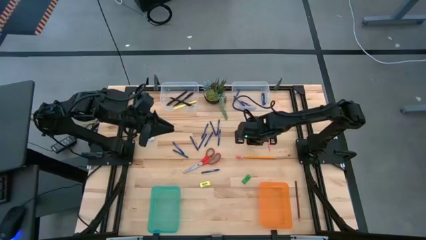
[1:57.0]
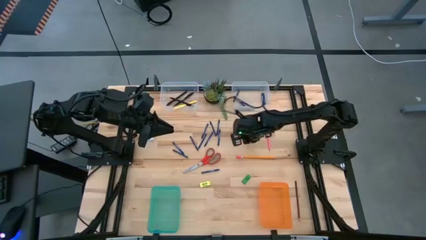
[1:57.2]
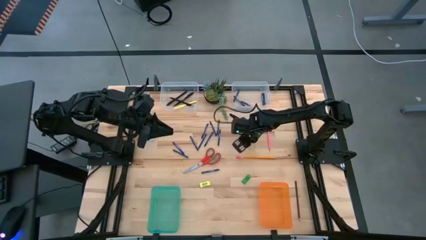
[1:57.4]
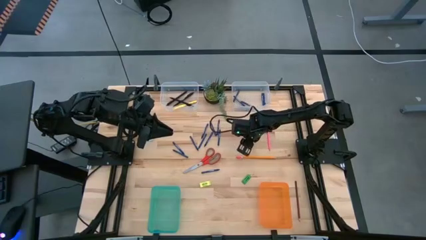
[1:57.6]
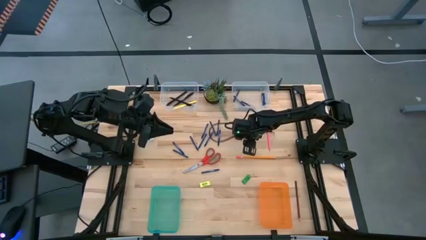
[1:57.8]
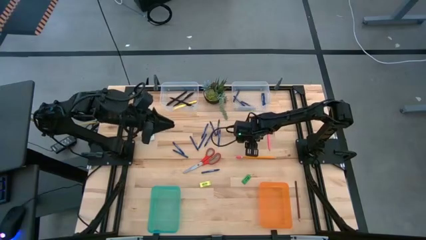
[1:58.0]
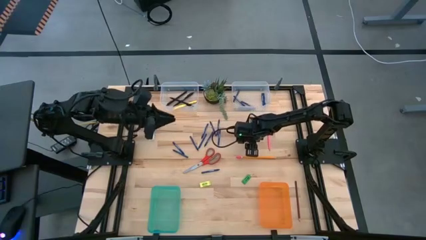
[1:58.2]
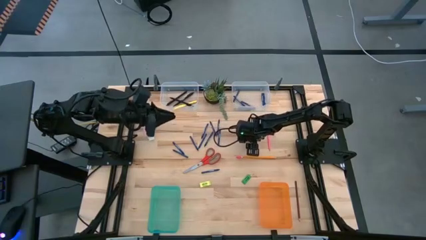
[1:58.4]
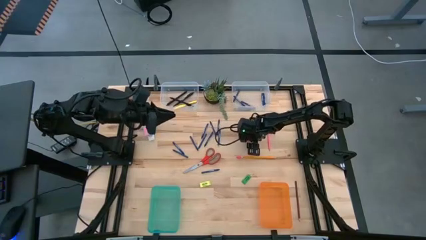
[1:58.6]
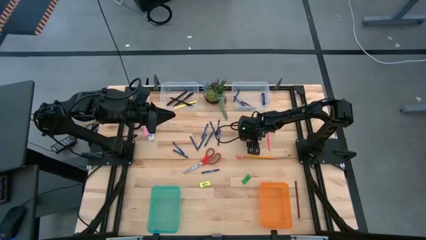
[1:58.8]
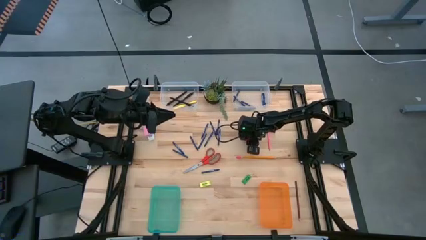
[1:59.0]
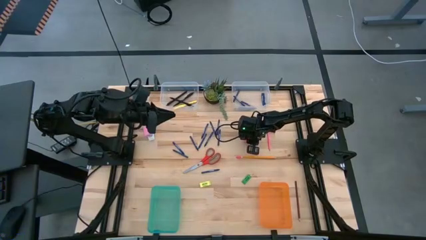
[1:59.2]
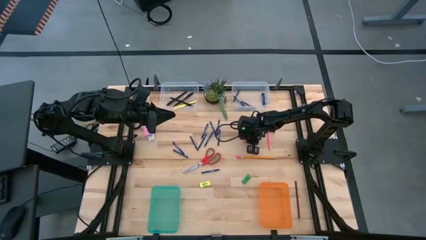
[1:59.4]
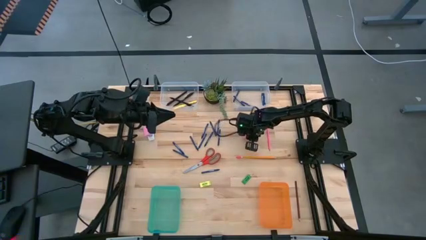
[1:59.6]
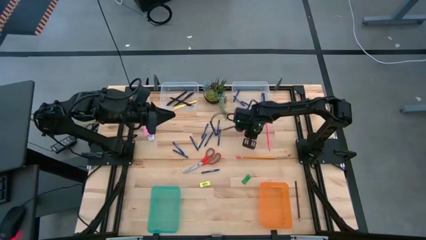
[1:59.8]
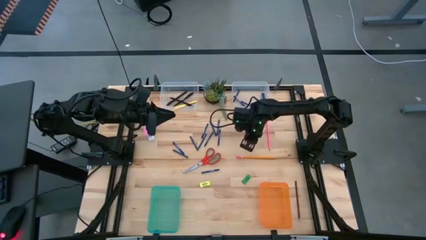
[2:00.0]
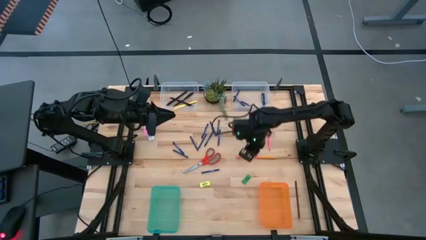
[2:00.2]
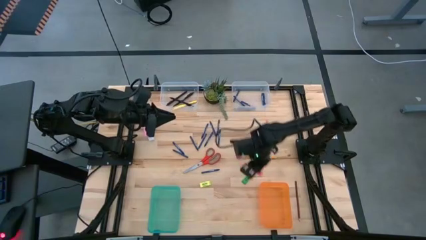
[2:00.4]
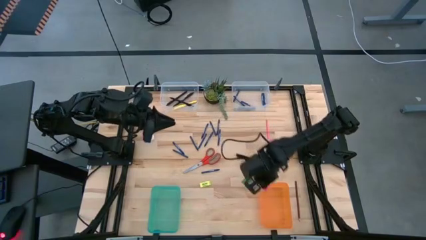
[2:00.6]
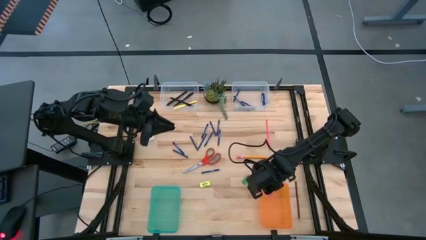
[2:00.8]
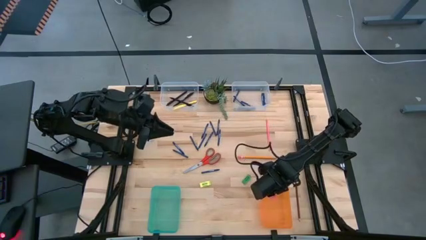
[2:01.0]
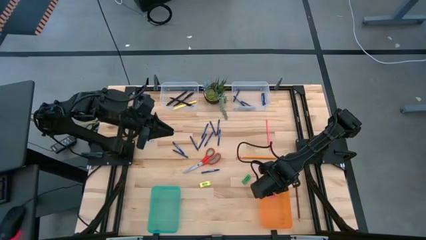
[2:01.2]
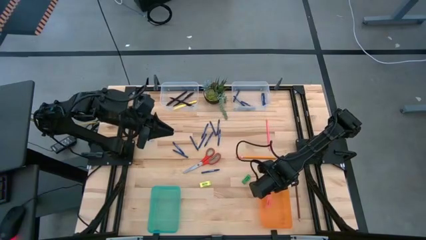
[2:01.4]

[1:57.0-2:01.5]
Task: Sort crayons/erasers/pens/pencils in bins
Put the pink eraser into the orange bin

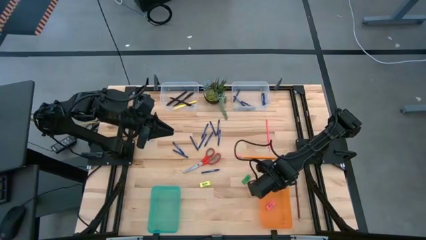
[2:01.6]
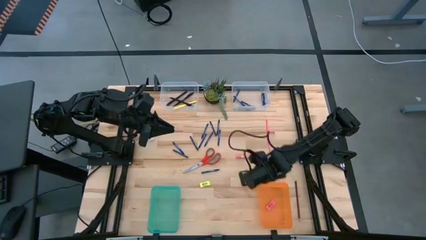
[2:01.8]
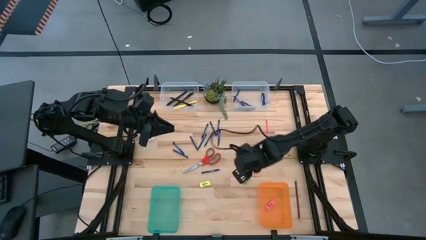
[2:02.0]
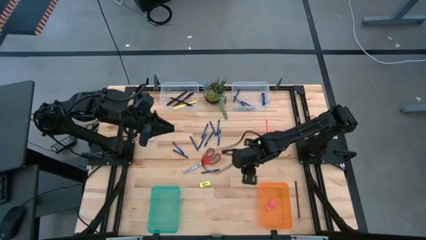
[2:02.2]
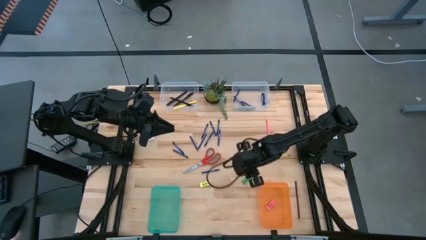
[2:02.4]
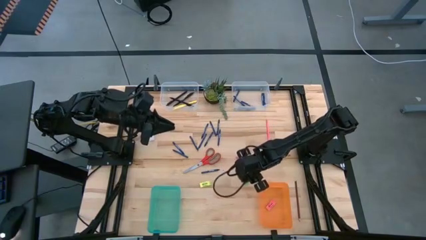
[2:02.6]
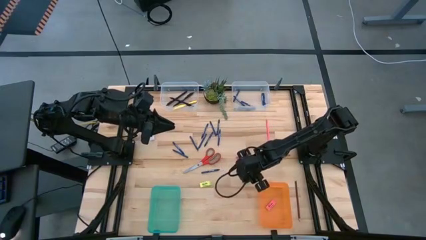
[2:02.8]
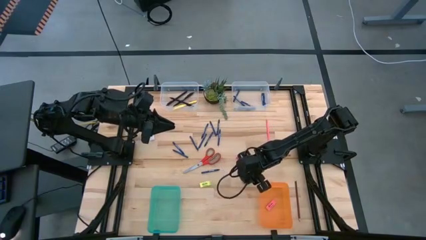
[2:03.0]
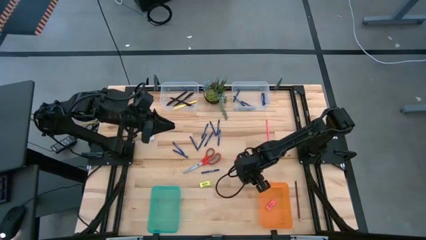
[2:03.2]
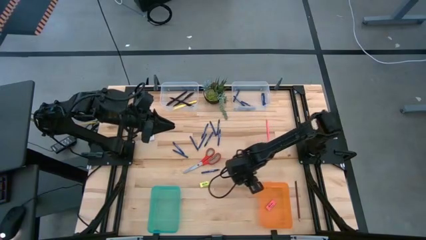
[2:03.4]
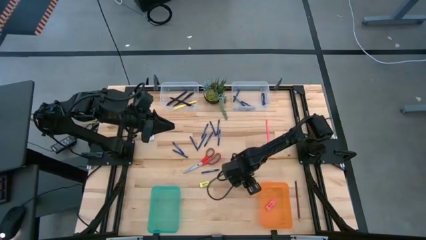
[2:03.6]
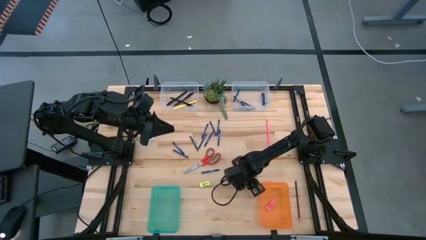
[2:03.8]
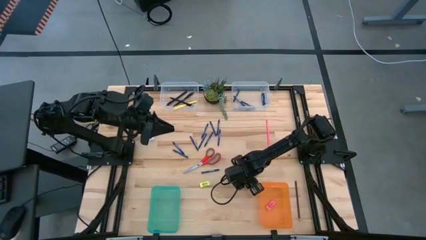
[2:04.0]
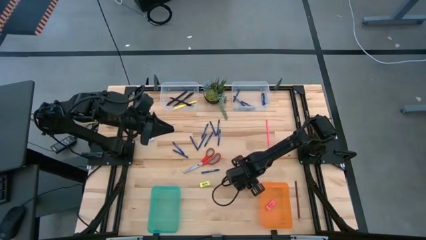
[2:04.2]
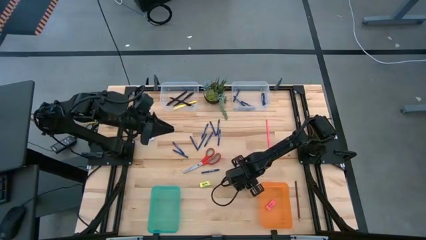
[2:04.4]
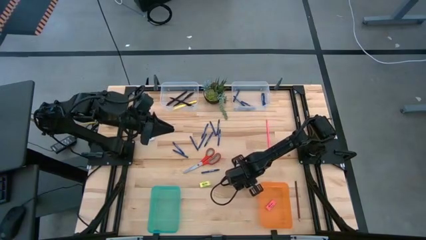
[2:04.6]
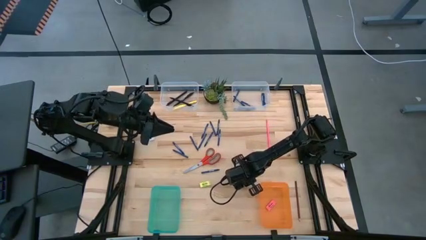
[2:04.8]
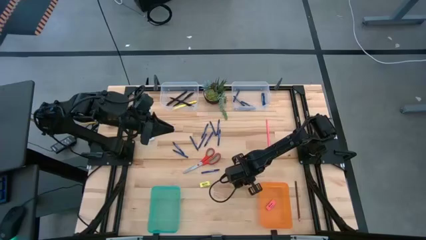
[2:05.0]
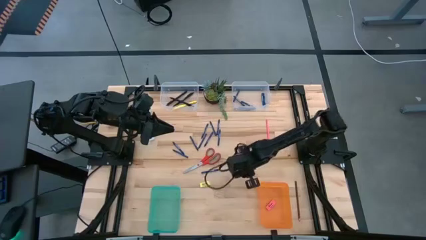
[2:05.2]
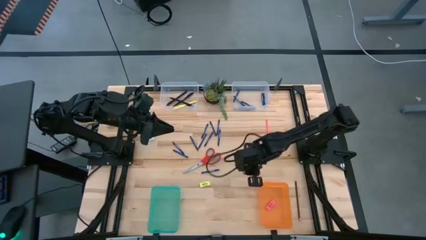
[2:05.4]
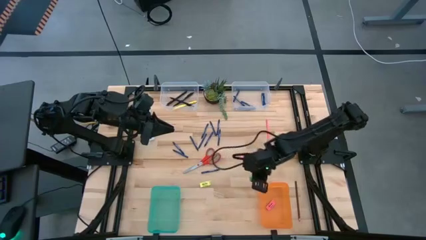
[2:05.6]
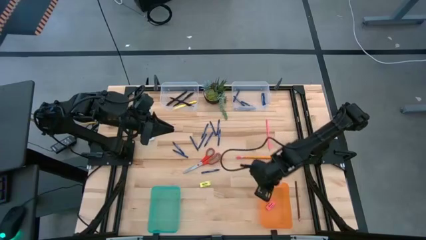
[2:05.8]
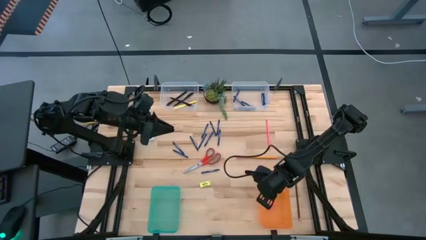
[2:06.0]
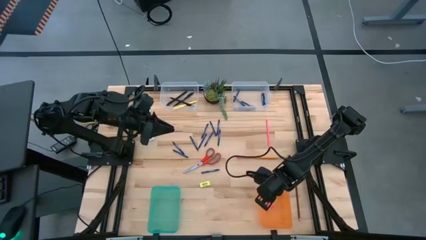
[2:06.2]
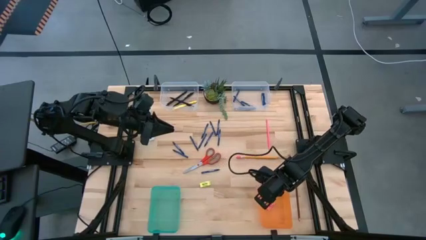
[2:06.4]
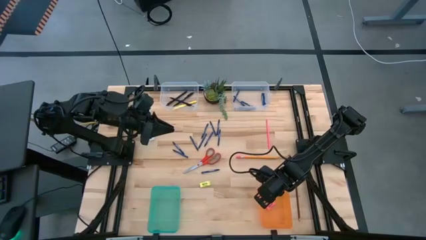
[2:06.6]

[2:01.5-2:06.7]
Put the green eraser into the orange bin

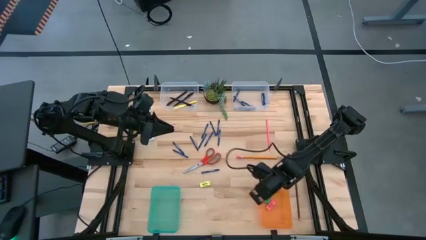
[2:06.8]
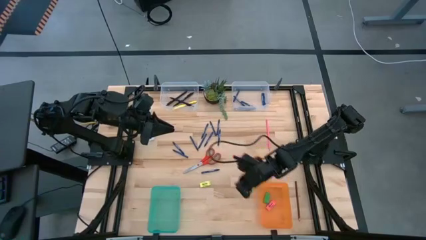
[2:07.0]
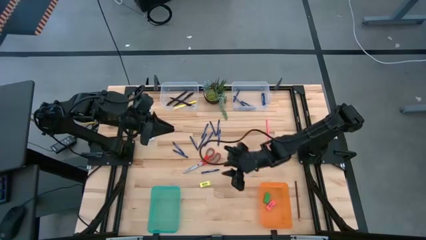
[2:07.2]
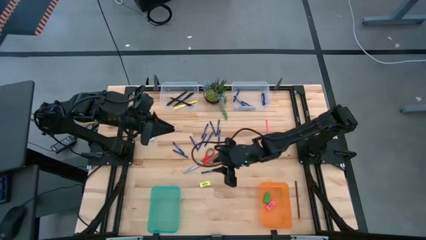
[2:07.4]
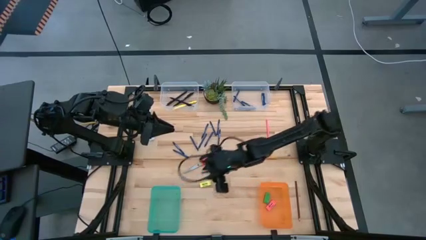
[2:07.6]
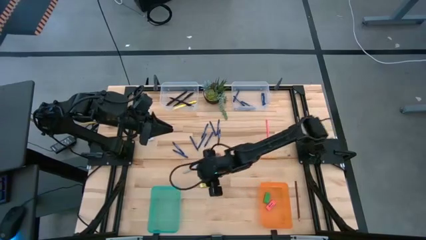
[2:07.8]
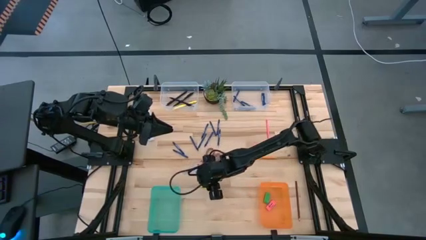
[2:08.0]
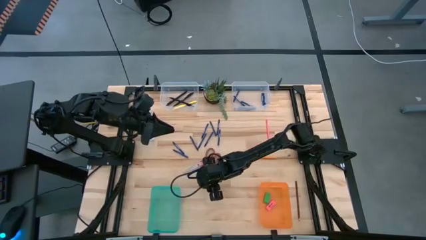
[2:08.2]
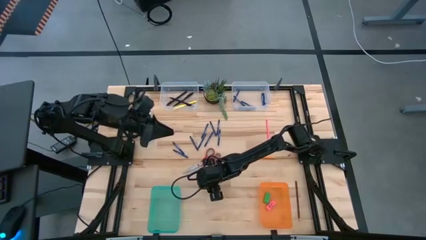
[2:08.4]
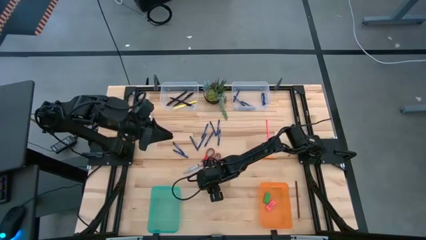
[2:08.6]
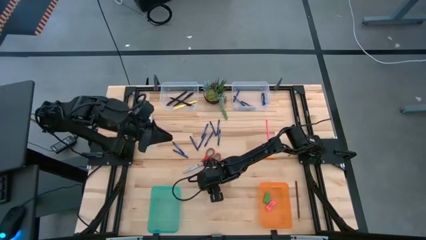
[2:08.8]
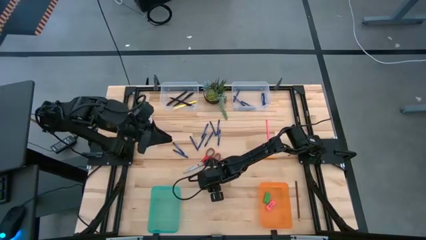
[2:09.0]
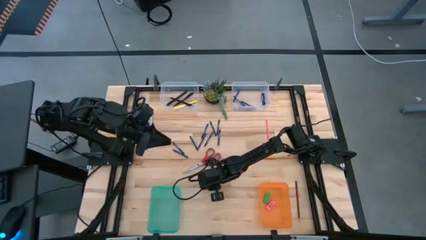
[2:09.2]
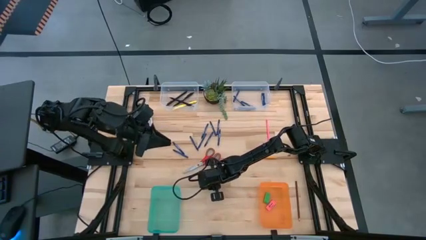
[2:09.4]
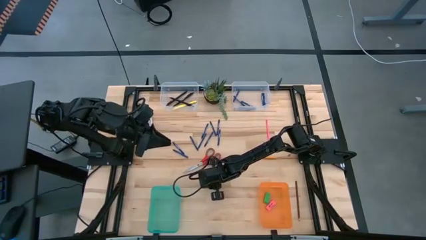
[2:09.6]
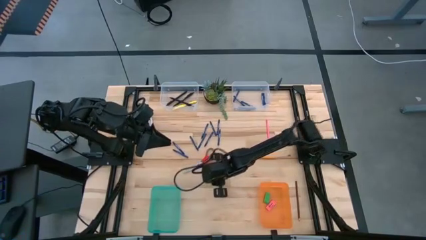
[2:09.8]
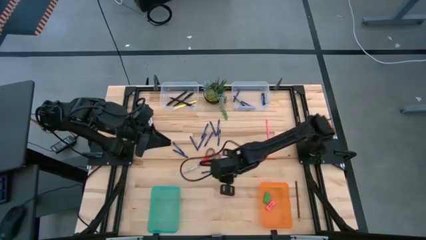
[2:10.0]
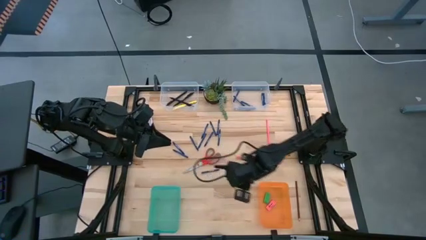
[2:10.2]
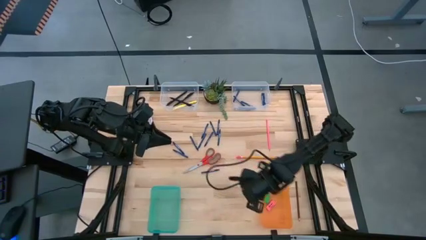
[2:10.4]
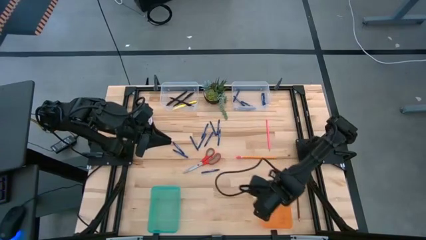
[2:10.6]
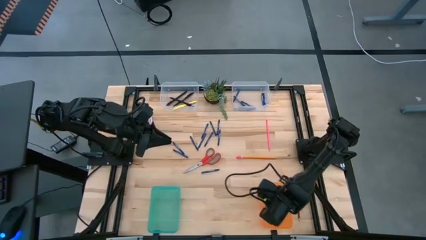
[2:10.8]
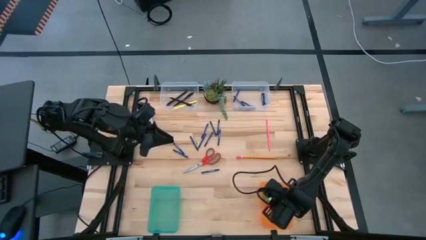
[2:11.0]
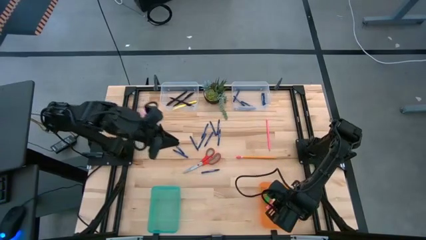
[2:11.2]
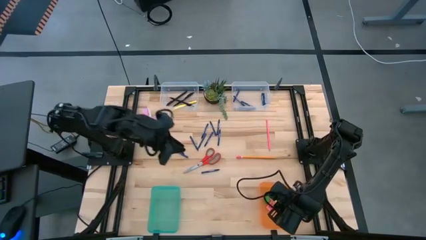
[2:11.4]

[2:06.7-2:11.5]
Put the yellow eraser into the orange bin

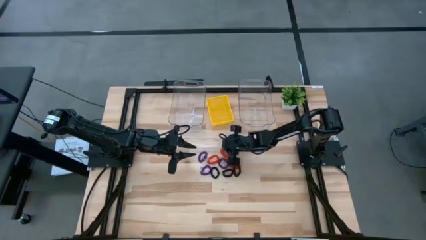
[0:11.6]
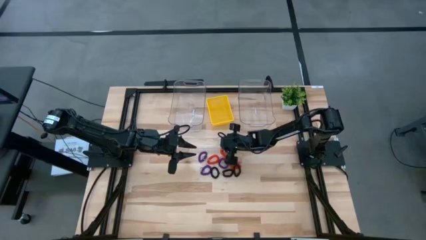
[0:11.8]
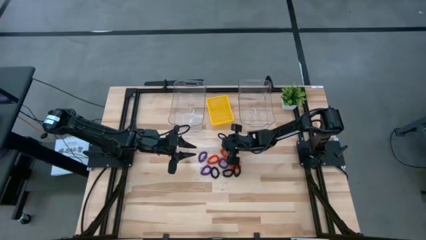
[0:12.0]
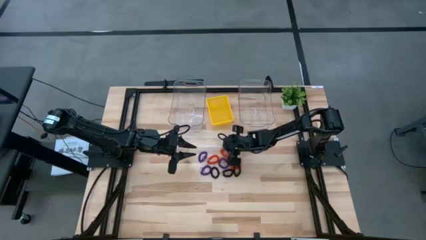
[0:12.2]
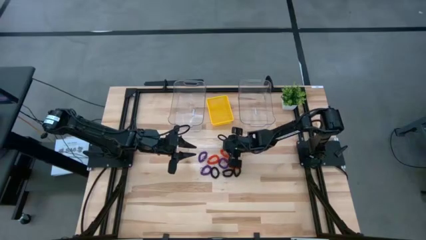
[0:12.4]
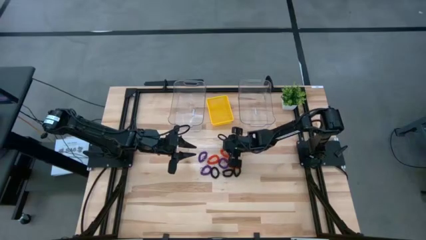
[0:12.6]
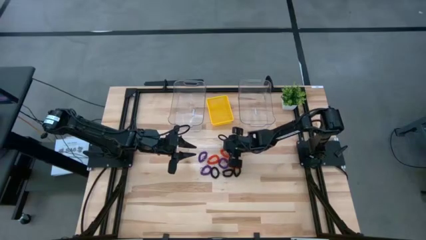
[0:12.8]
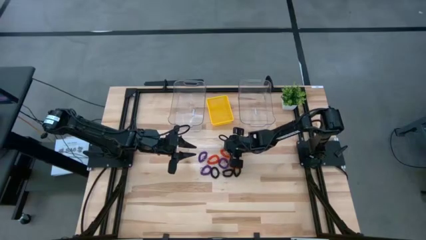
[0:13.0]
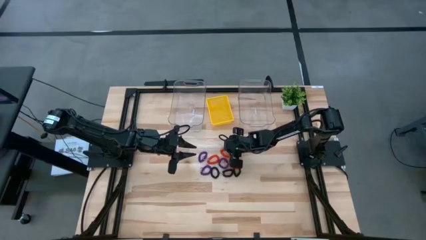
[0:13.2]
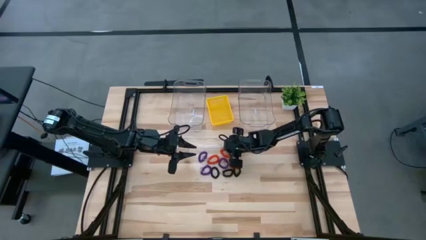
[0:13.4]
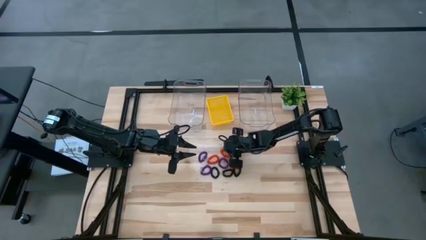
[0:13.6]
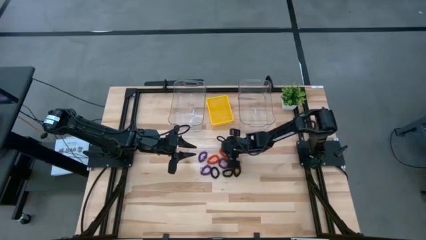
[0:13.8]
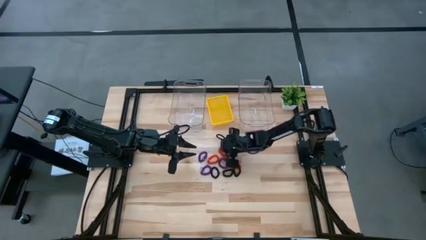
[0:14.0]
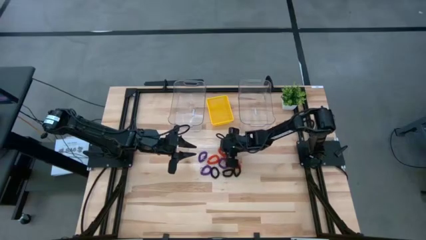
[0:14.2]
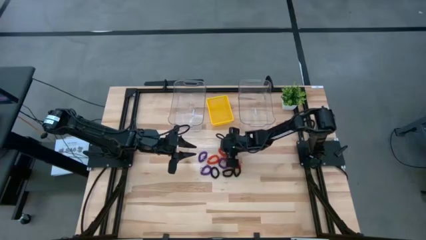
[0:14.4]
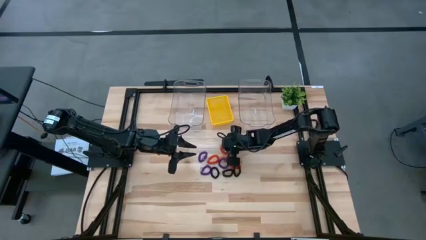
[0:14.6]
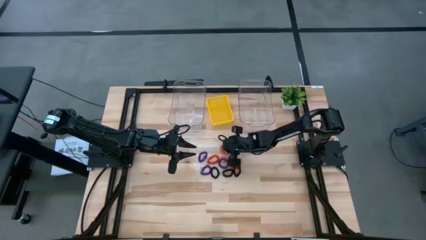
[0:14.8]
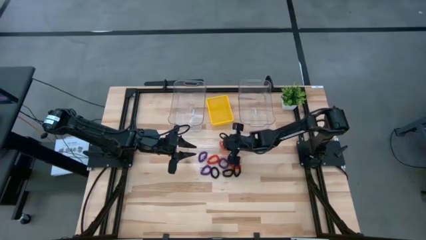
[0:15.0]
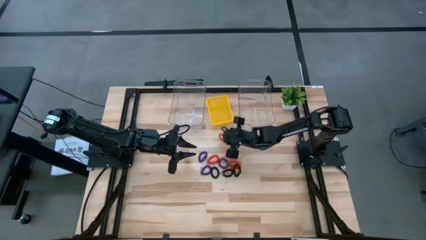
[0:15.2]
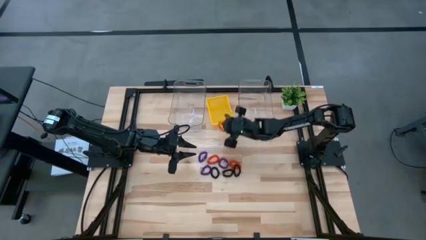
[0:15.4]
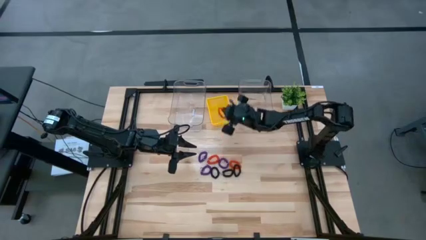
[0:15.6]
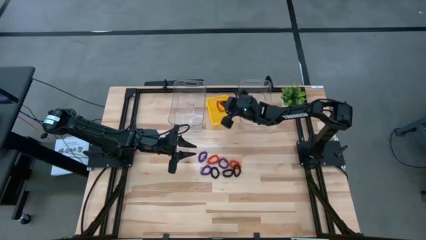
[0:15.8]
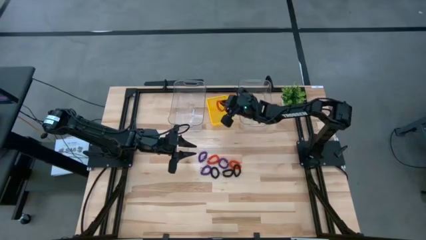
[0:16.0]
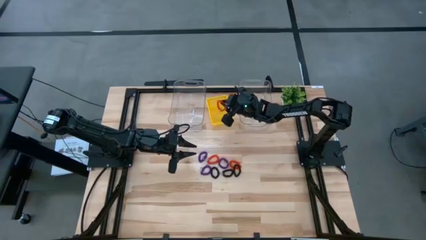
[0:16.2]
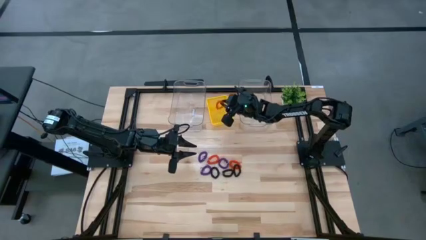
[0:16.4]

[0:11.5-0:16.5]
Task: Sort spring keychains
Put the top right orange spring keychain into the yellow bin
